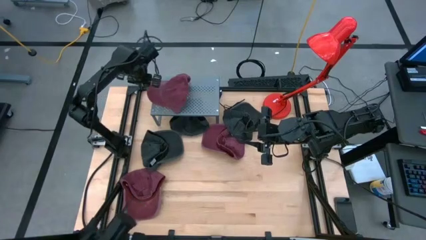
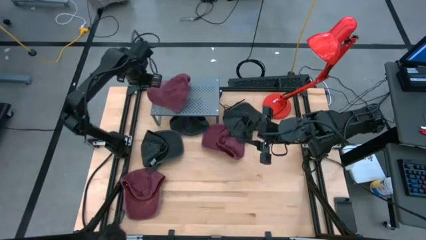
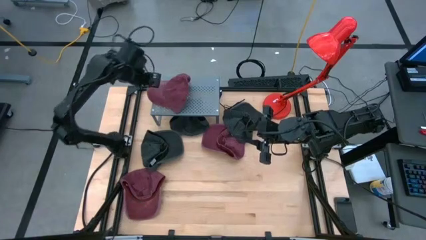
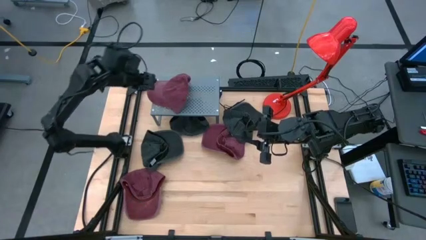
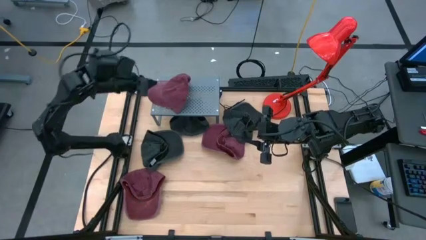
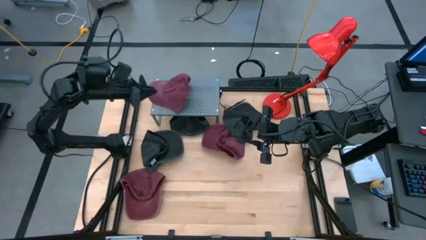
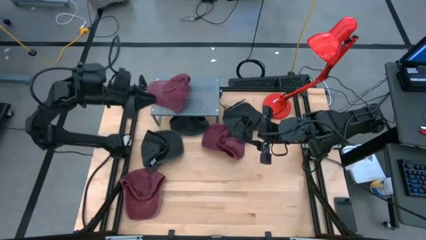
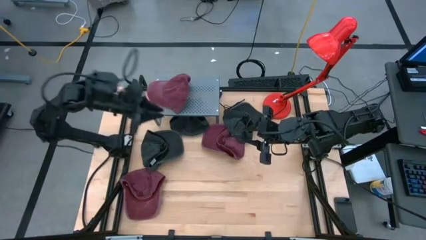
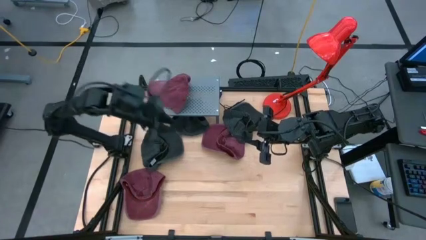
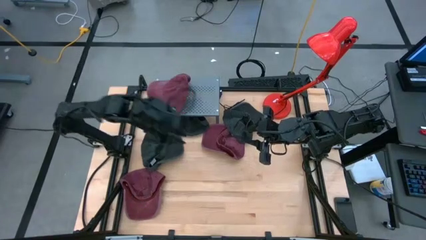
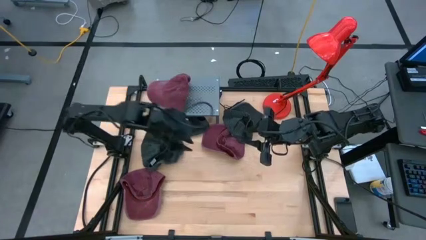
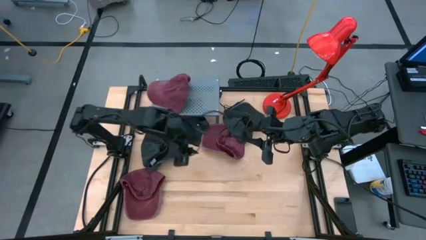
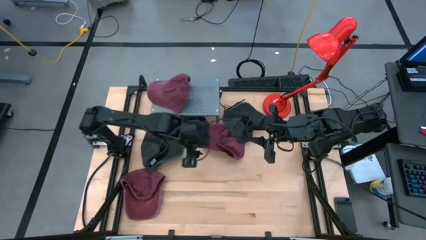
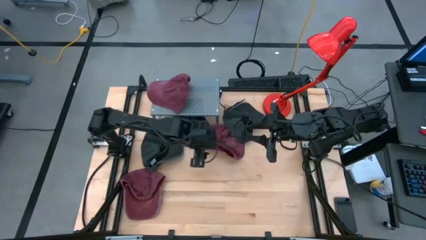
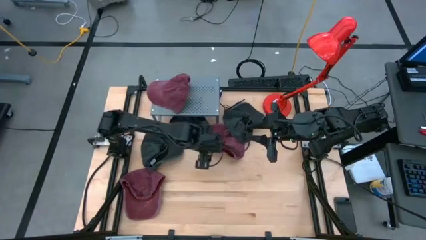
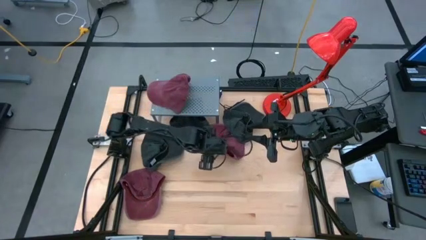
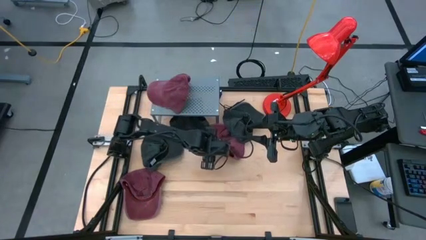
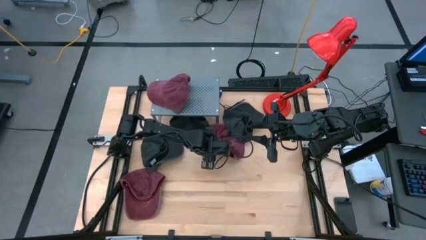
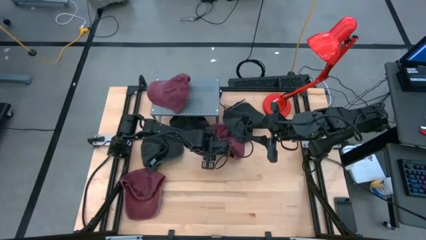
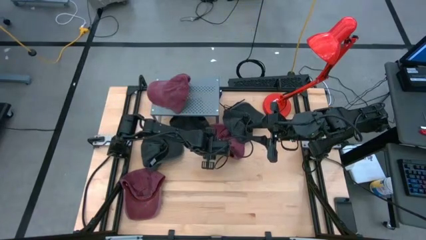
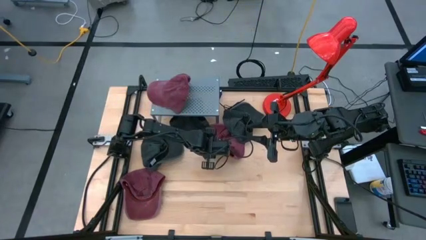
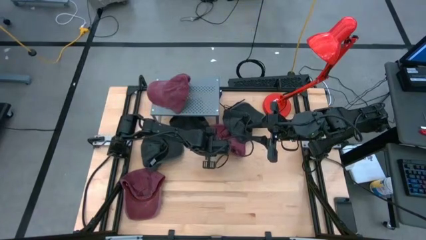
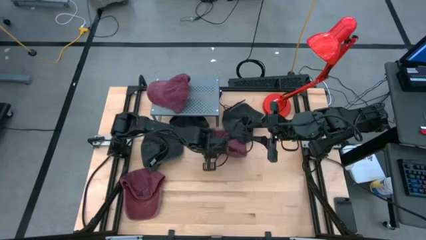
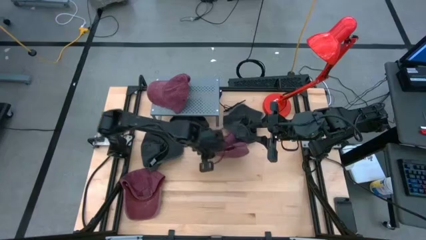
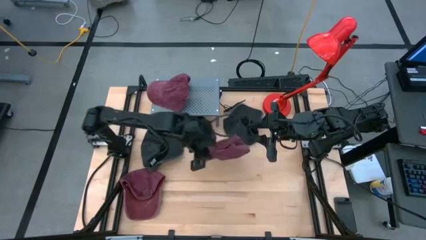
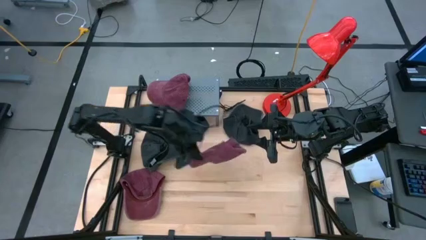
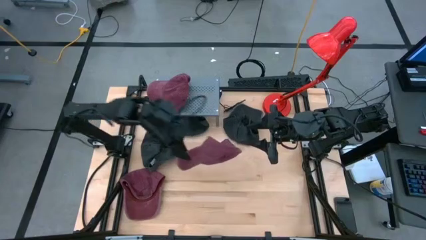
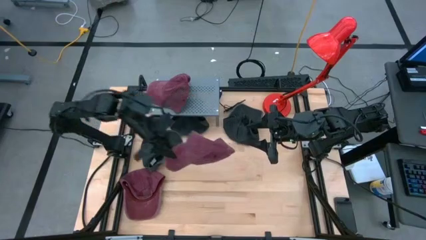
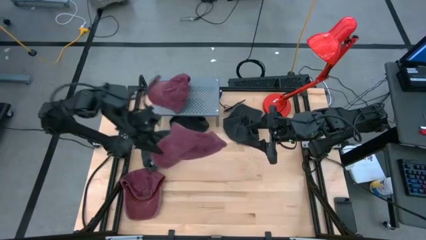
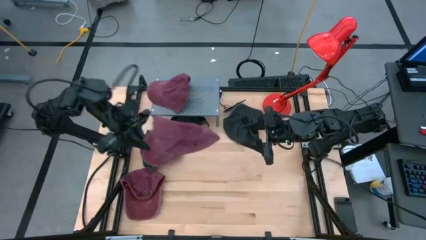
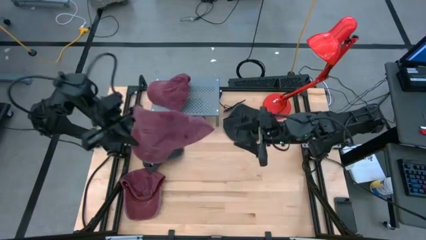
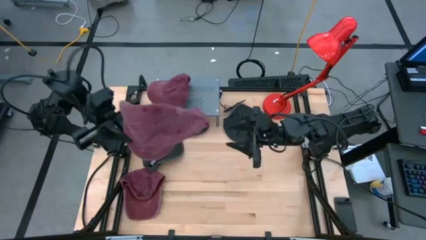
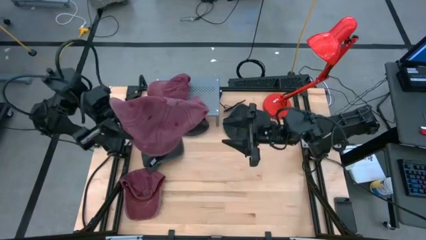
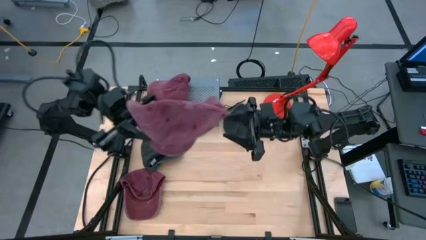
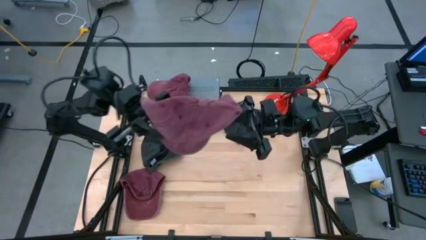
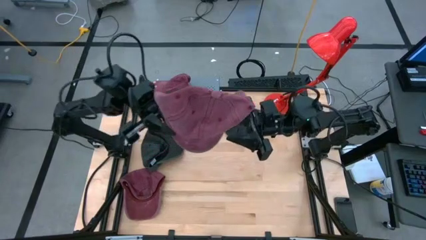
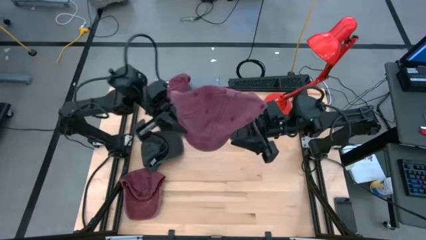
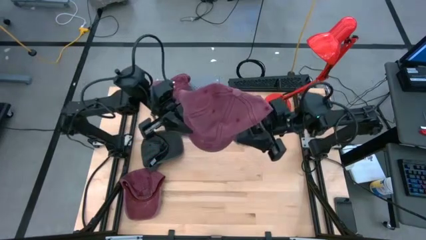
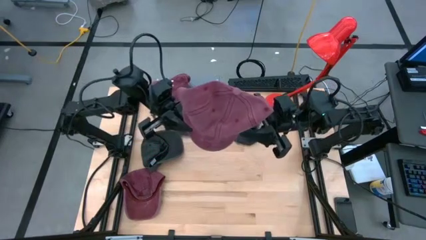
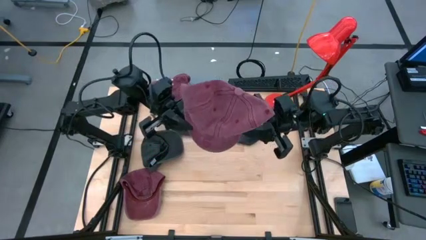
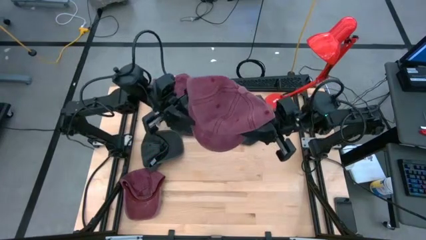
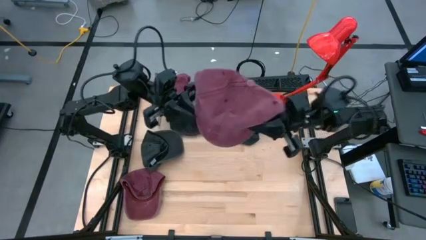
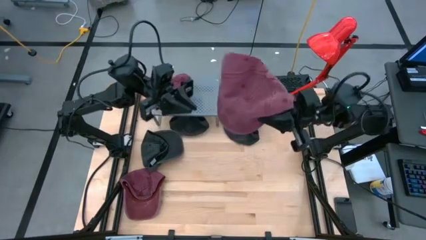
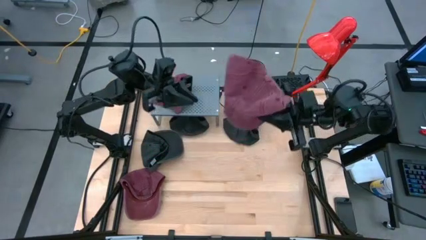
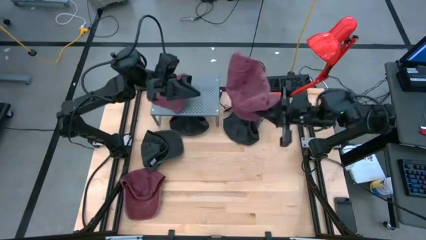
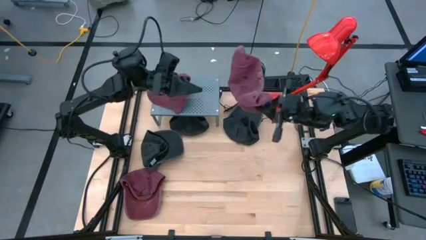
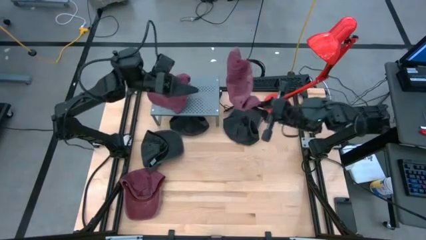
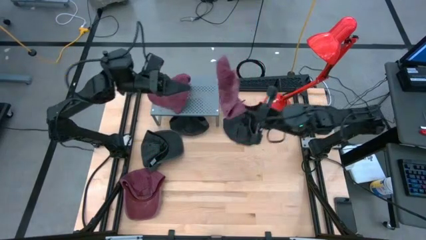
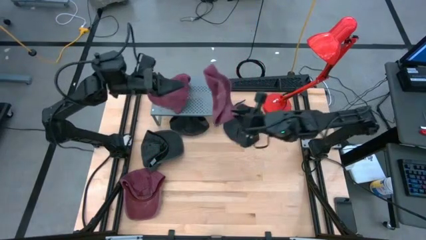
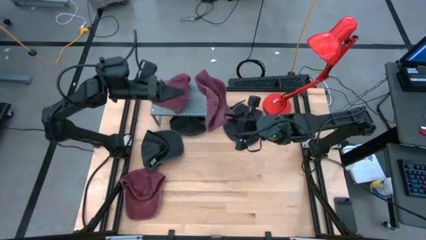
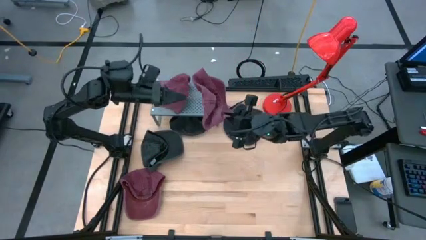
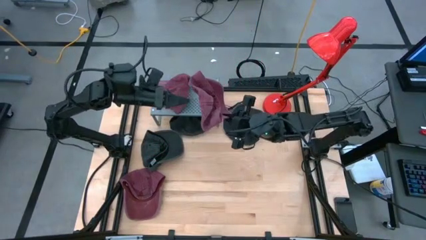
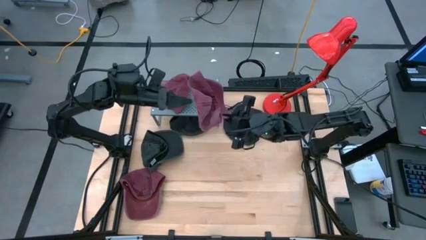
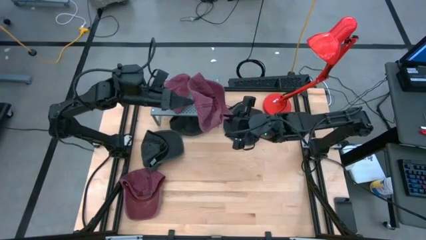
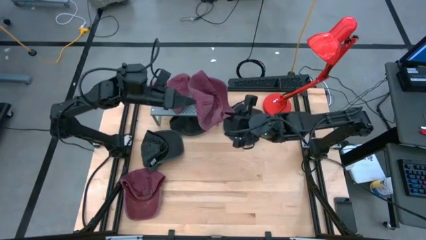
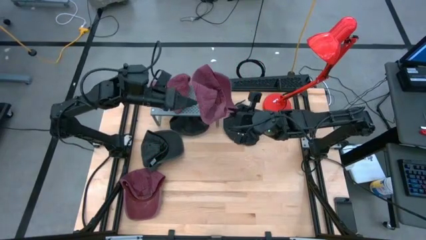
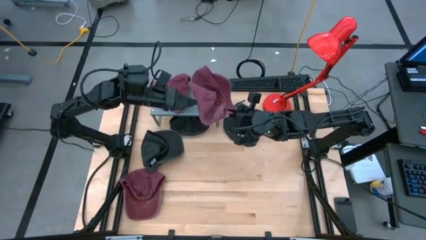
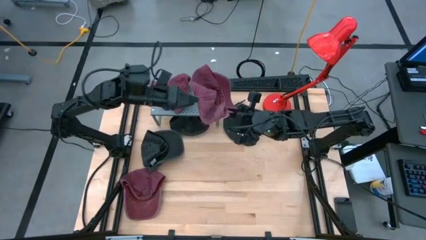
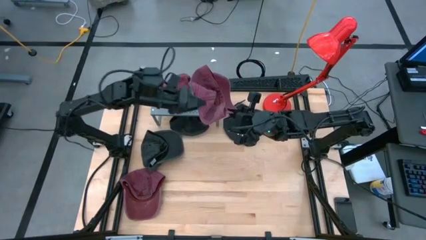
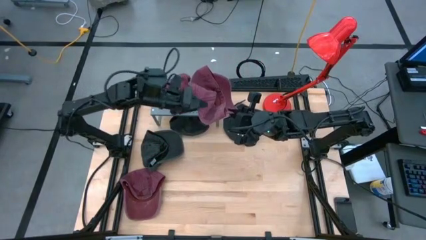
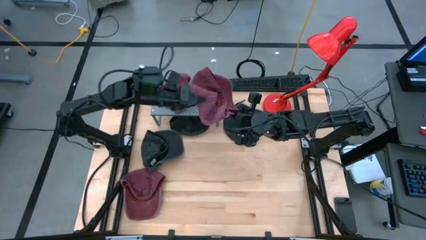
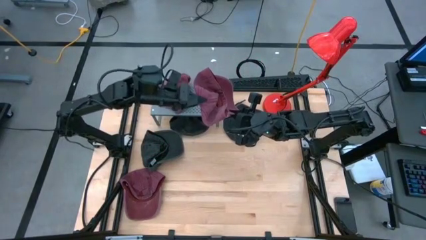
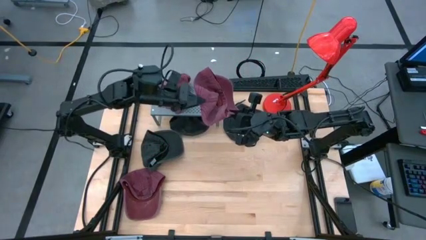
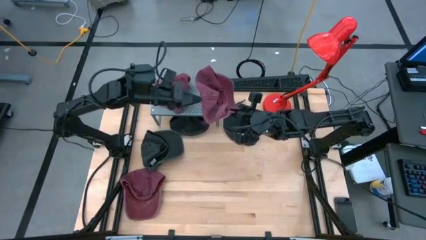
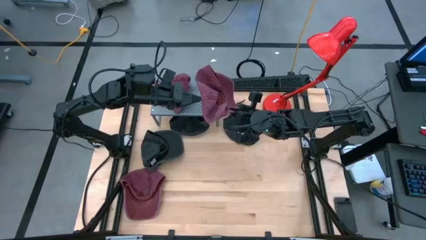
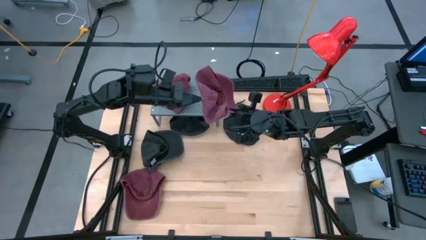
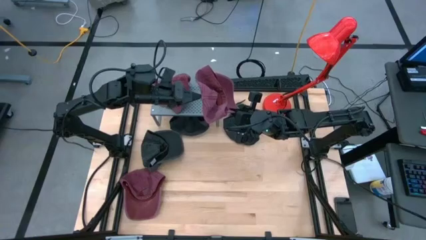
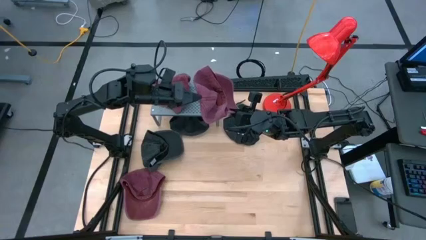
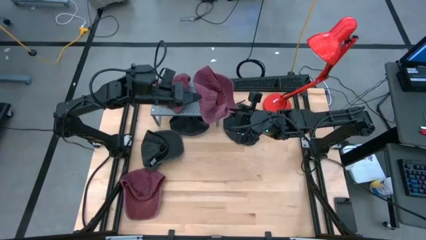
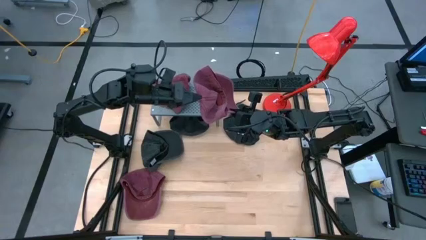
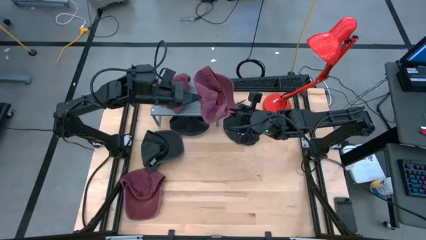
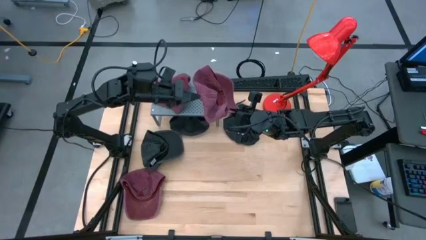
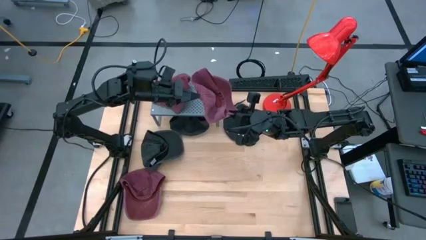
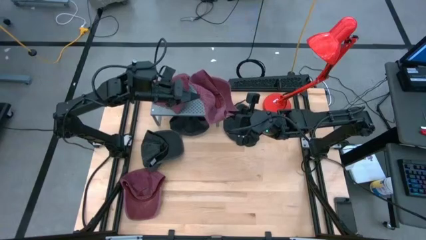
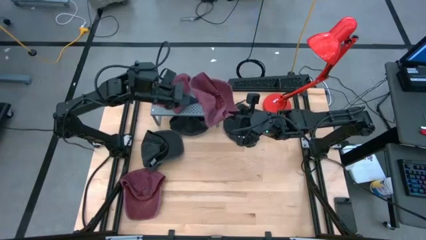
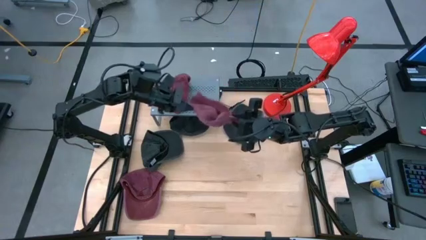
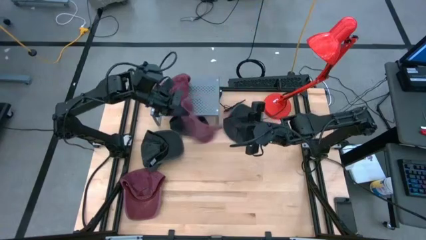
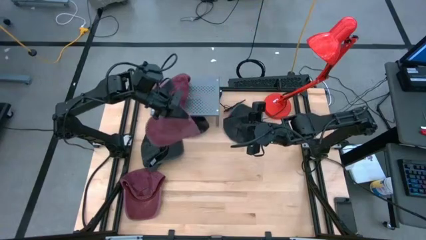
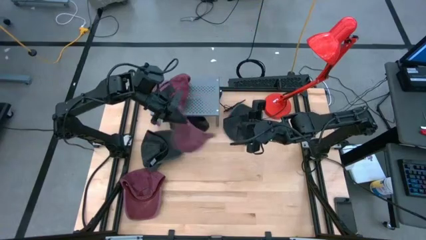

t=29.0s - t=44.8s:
Task: Pick & Place hat
Stack the top red cap on top of the red cap on the shelf
